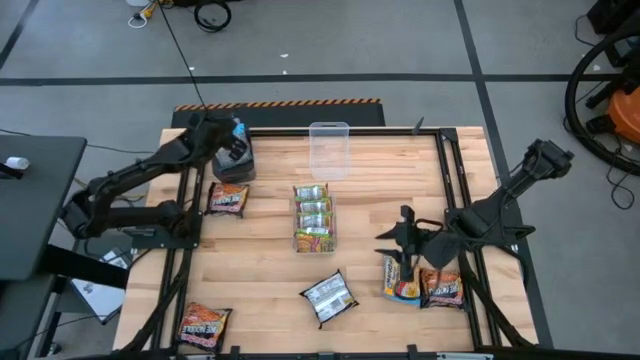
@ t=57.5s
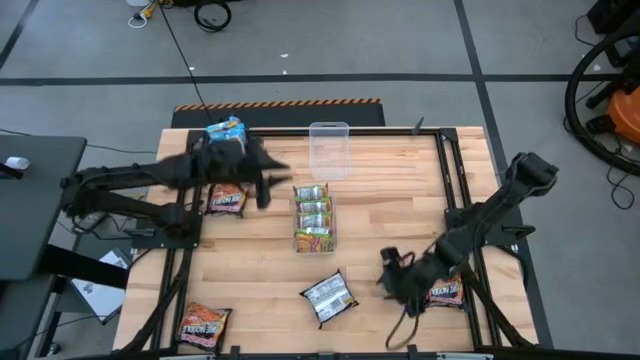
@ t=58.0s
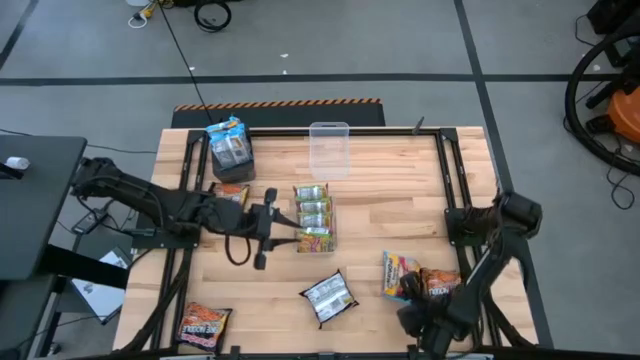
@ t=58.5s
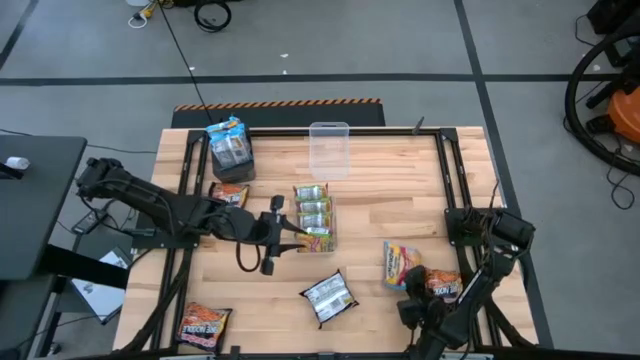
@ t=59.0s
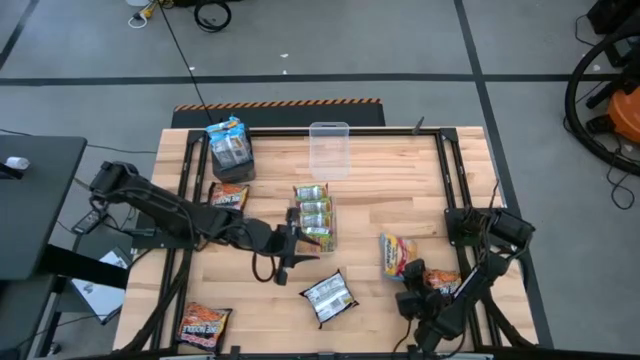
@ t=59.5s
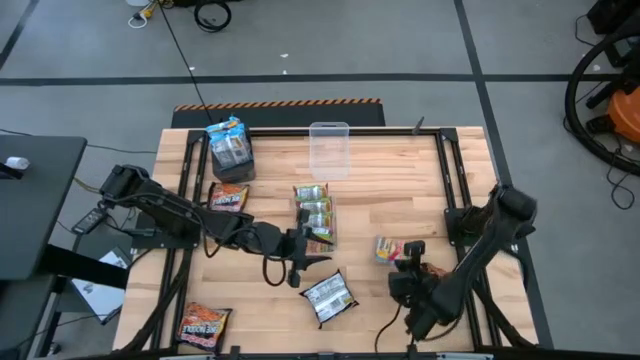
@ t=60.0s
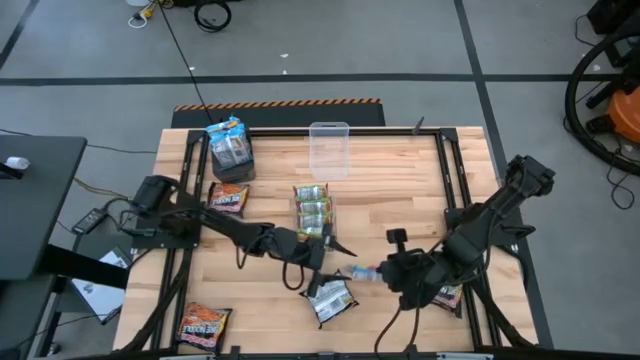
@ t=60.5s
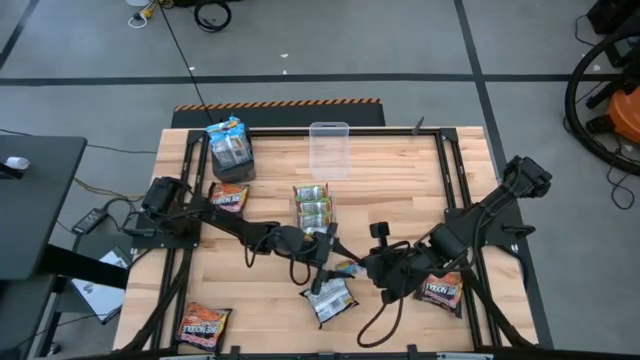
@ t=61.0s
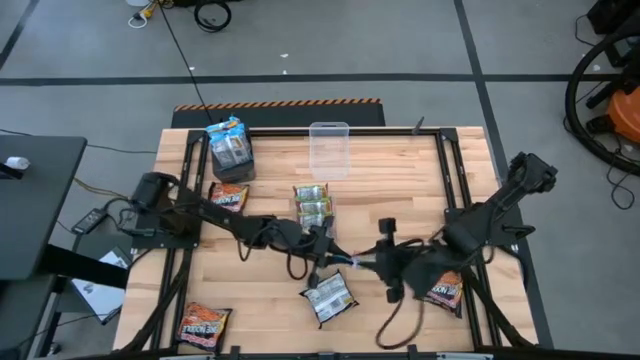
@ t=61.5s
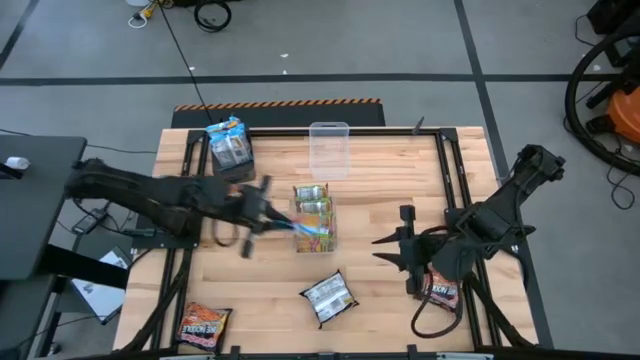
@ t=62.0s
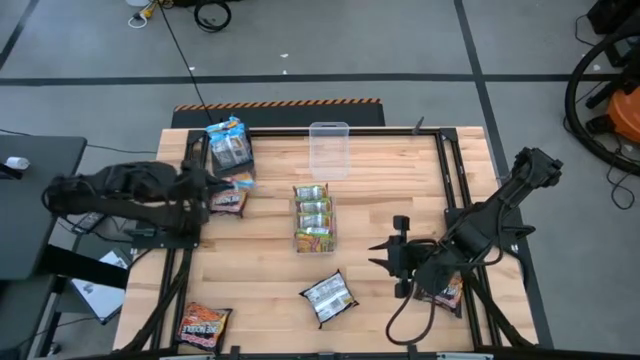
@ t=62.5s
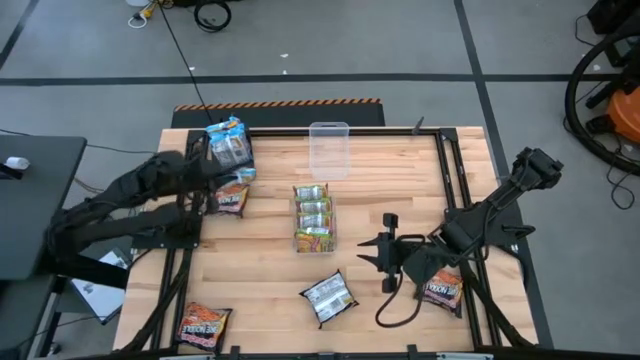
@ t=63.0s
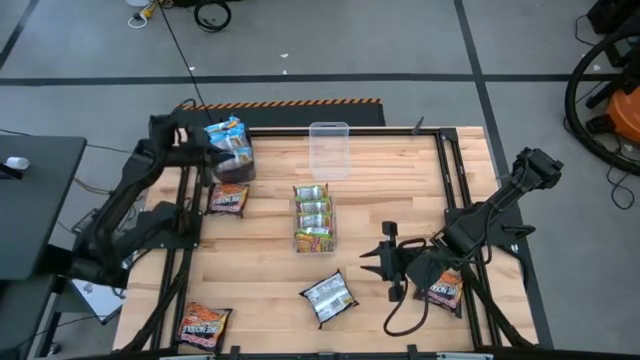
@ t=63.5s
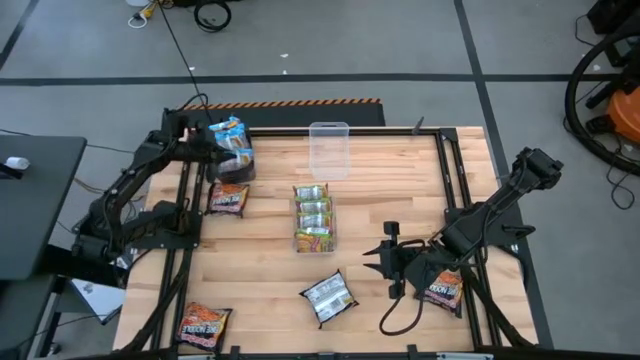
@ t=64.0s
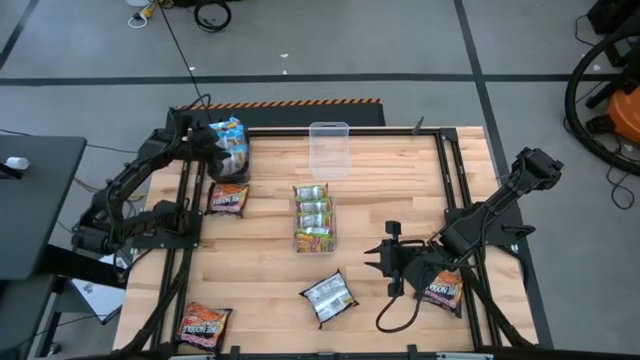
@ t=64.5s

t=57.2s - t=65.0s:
Task: Sort Maruchan noodles
Put the blue noodle pack into the black bin

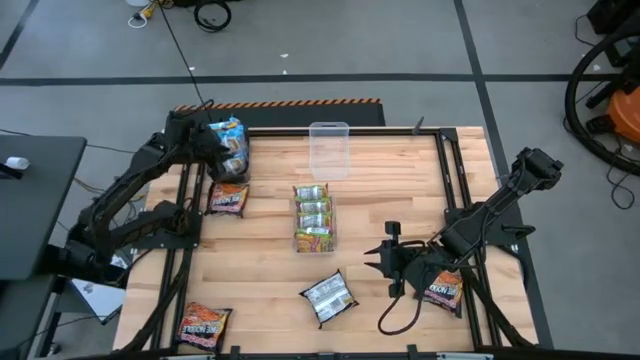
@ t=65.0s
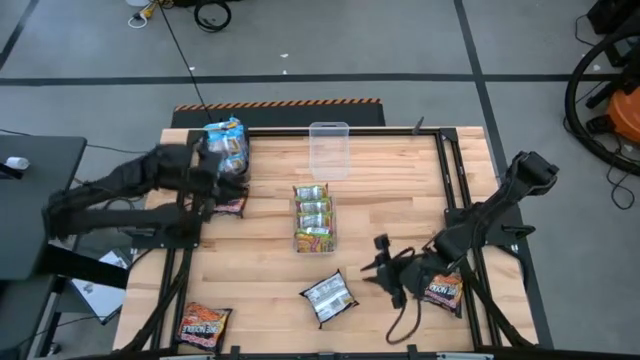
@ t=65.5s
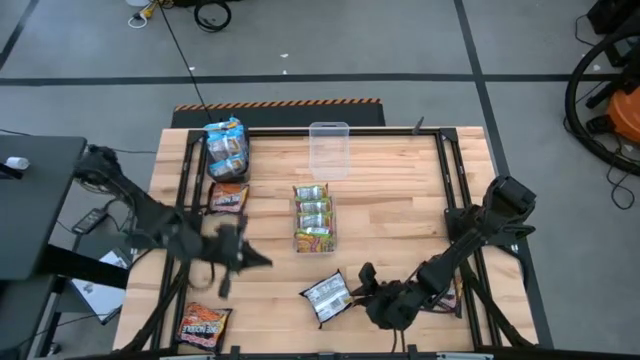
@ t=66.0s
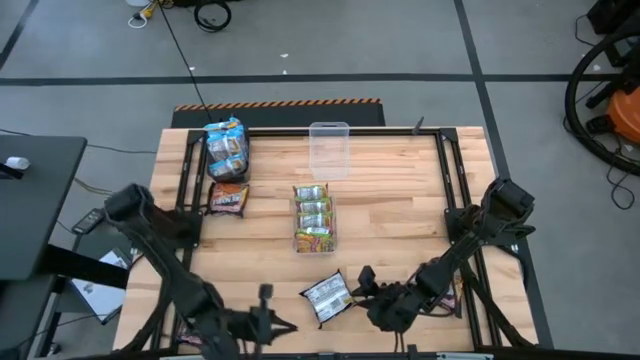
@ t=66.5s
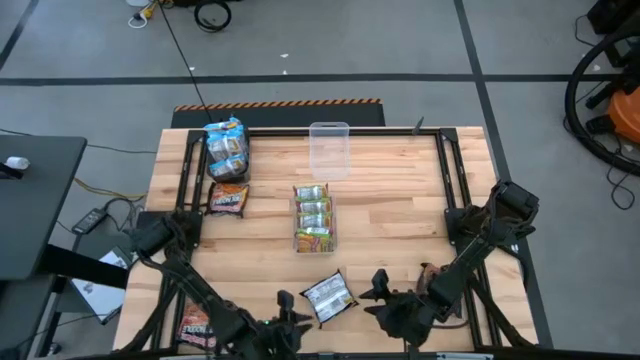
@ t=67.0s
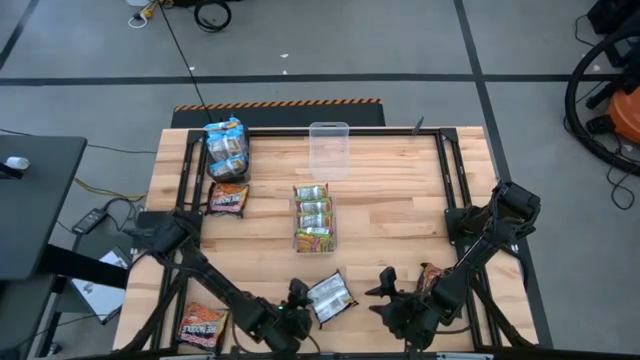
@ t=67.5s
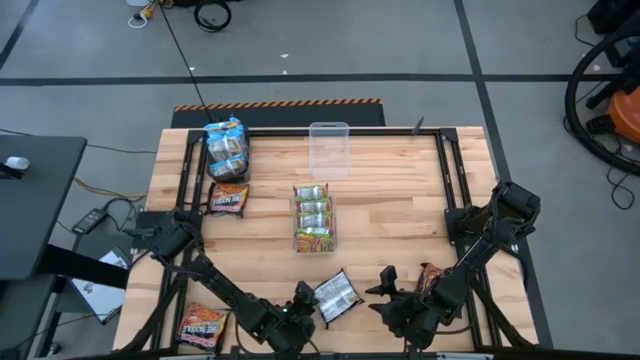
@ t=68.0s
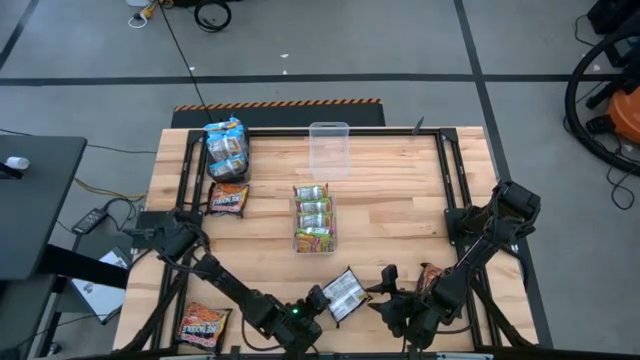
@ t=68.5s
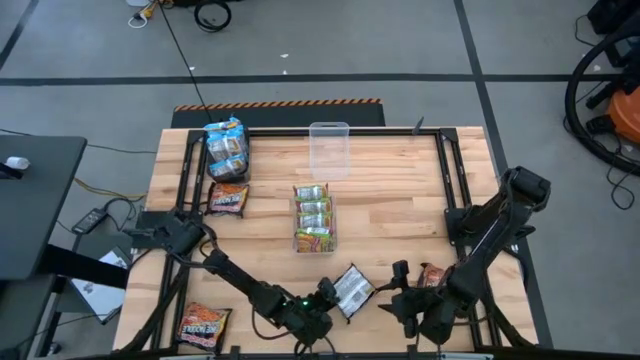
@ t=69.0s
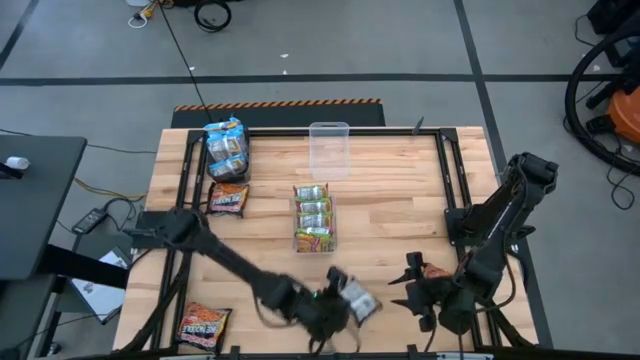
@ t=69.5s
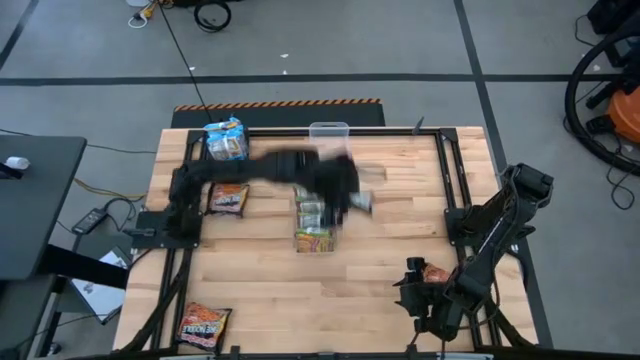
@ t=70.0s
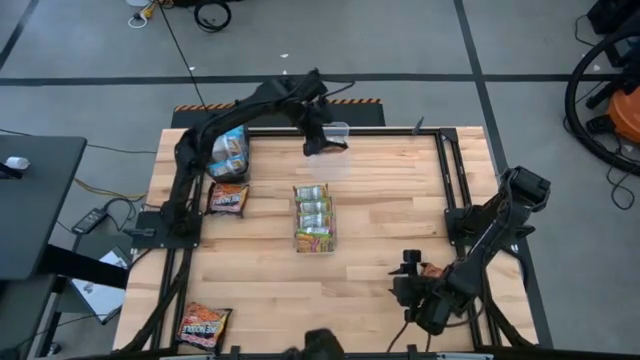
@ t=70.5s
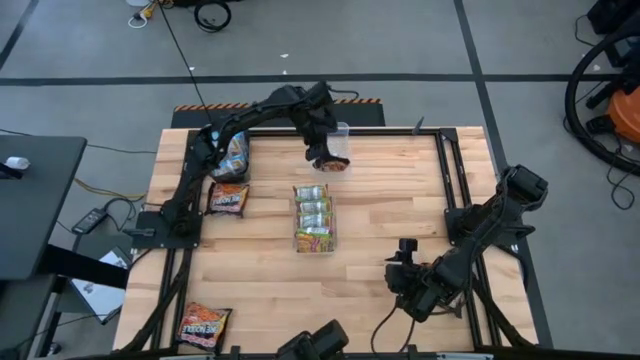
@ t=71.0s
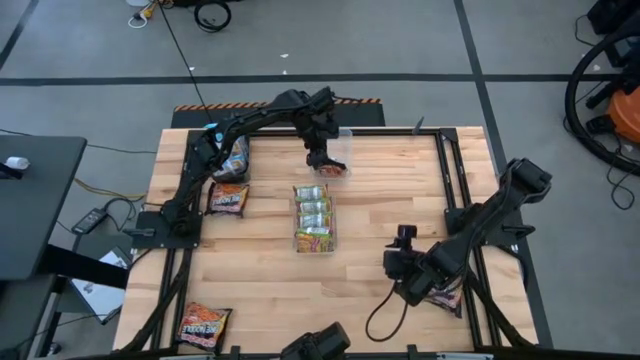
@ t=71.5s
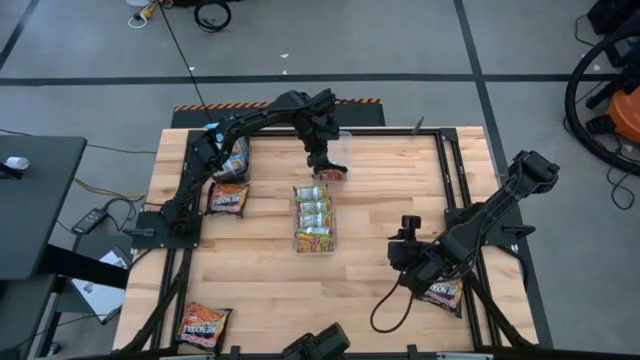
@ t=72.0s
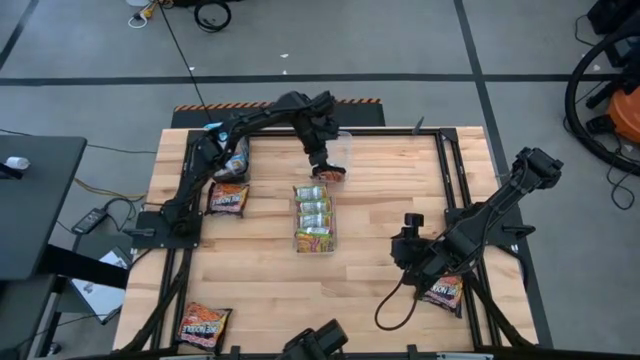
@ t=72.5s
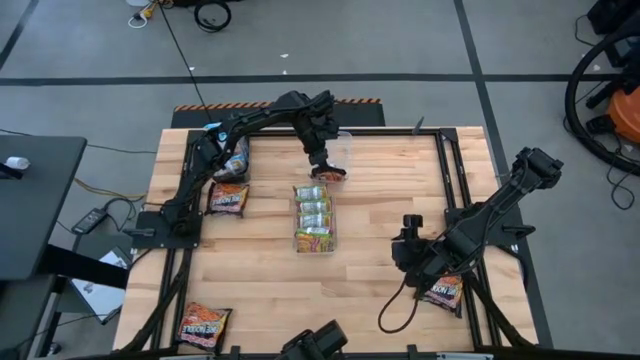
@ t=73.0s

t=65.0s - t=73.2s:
Put the black noodle pack into the top transparent bin

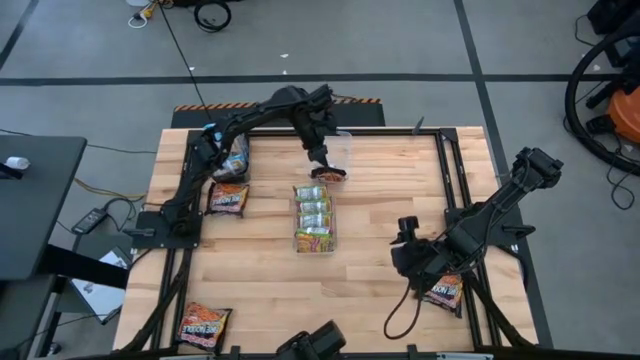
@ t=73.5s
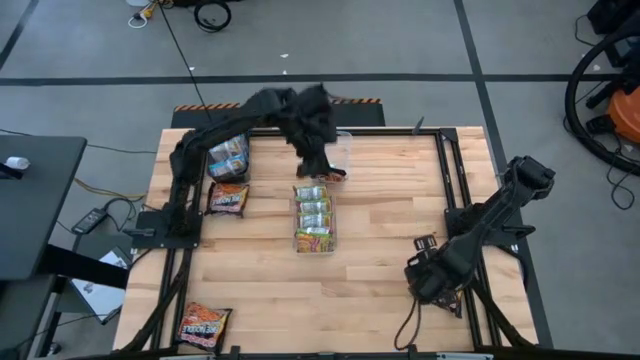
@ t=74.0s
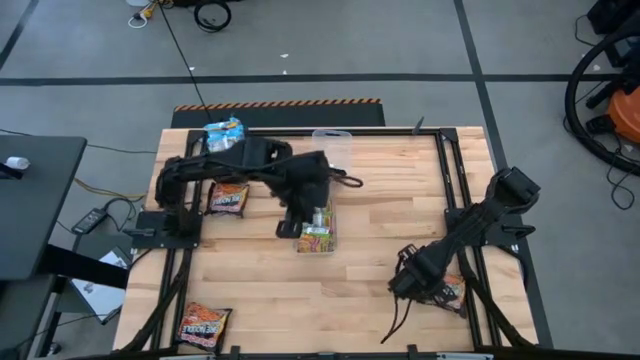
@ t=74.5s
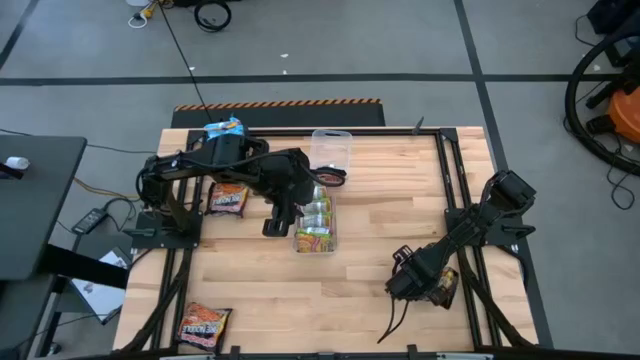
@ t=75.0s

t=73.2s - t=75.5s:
Put the black noodle pack into the top transparent bin

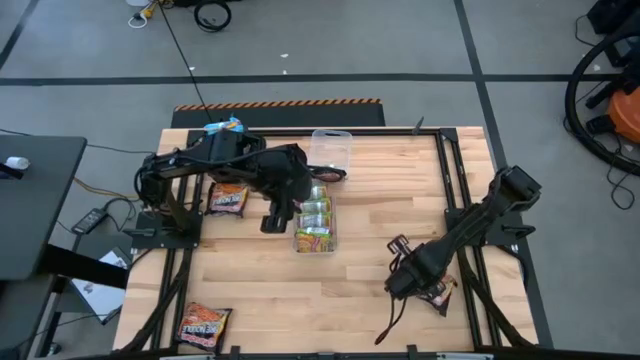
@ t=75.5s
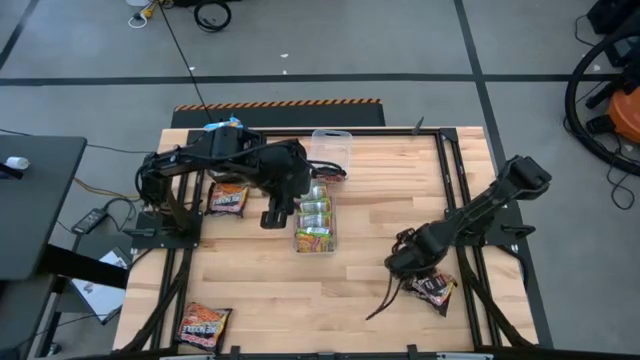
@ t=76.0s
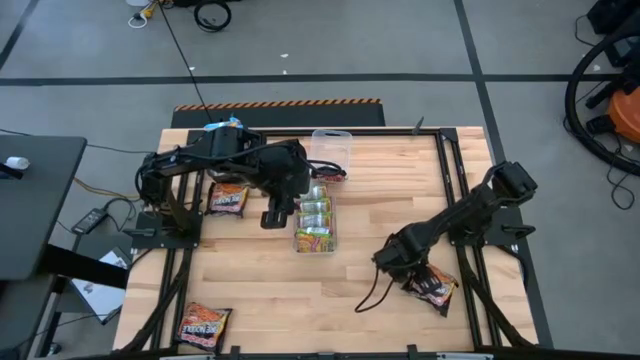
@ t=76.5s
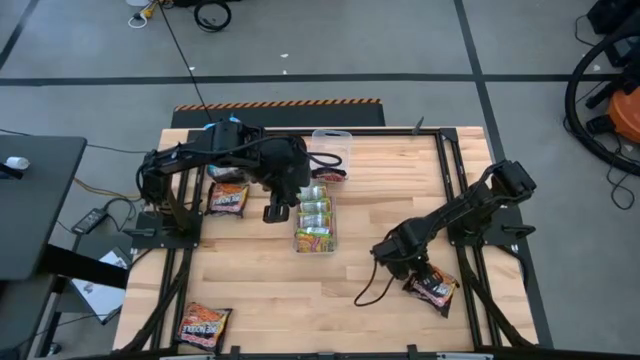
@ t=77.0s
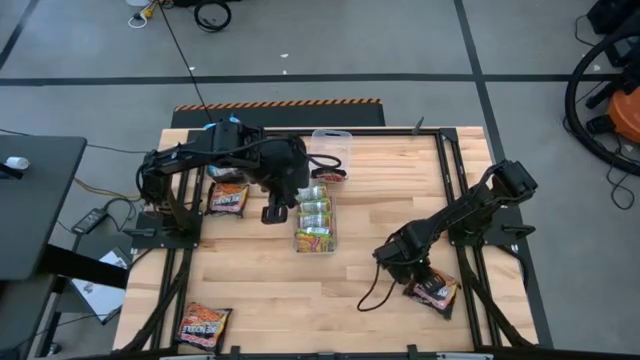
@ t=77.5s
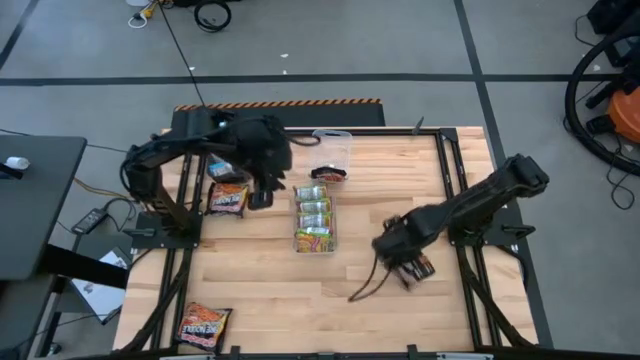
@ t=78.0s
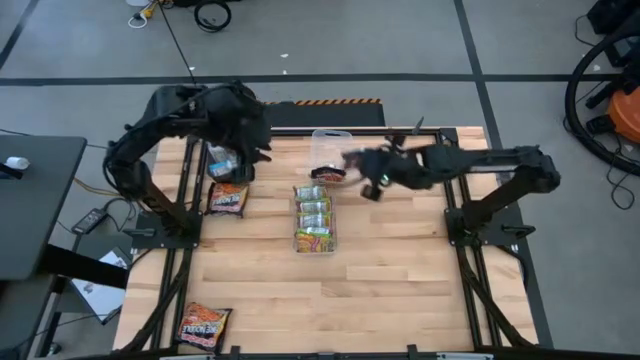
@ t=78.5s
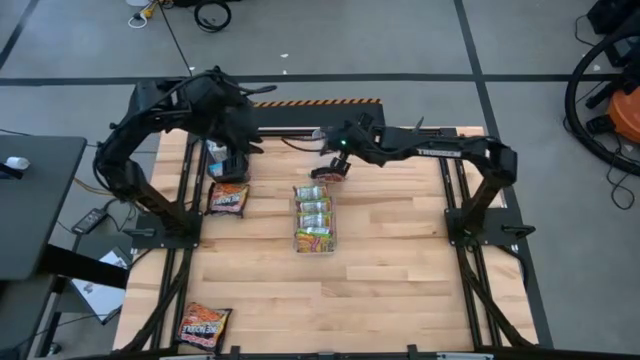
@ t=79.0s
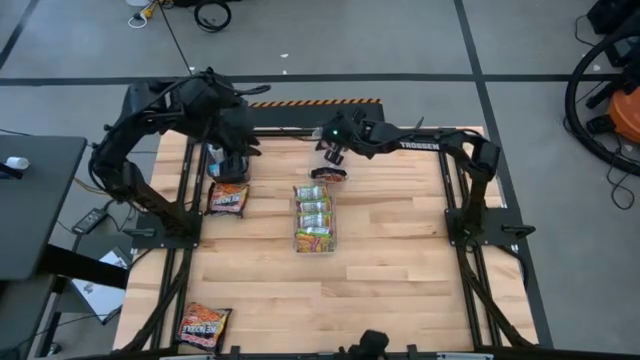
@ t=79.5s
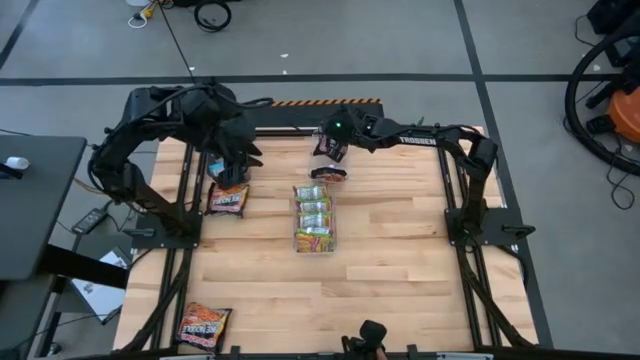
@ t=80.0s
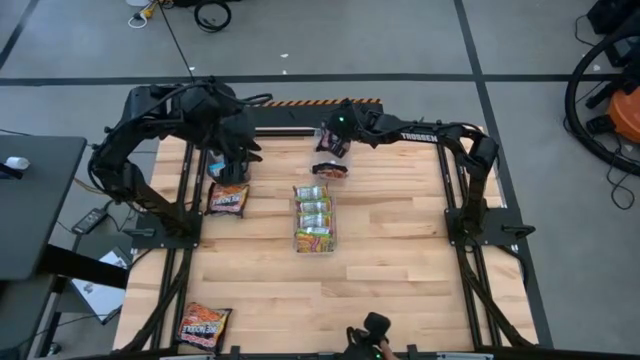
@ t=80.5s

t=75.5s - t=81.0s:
Put the black noodle pack into the top transparent bin
